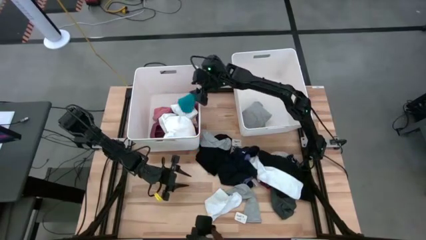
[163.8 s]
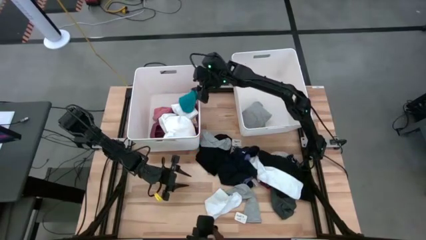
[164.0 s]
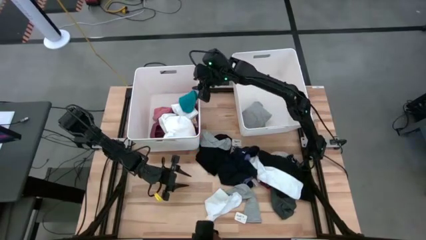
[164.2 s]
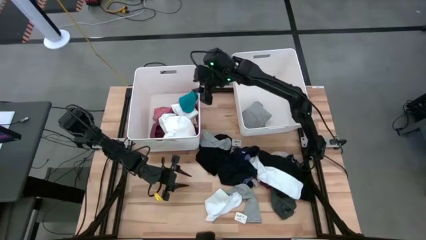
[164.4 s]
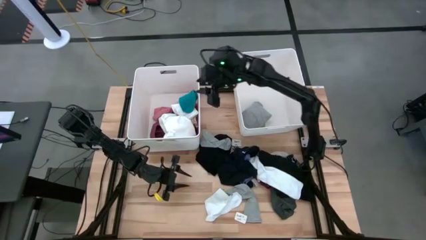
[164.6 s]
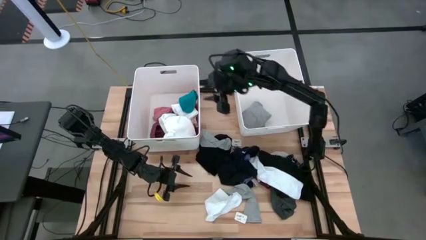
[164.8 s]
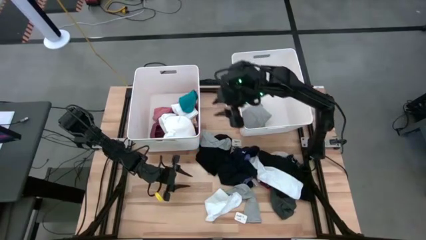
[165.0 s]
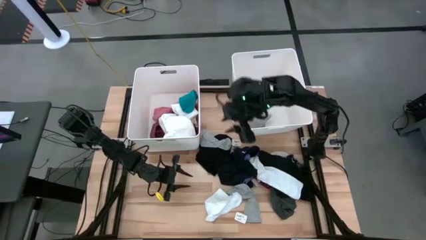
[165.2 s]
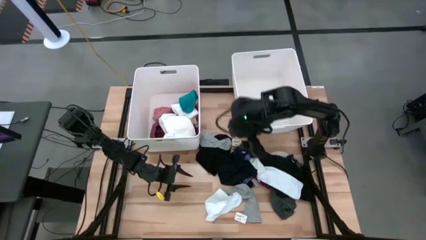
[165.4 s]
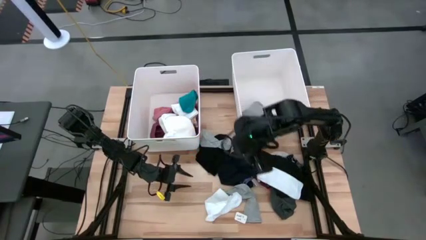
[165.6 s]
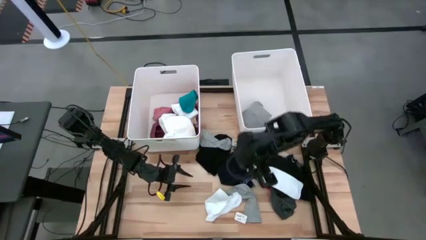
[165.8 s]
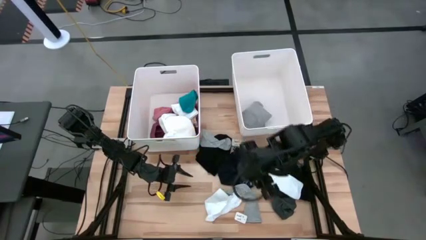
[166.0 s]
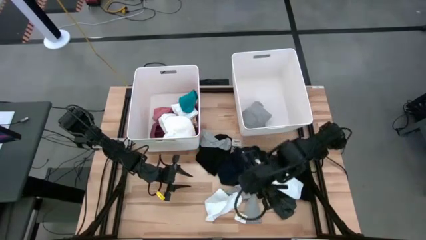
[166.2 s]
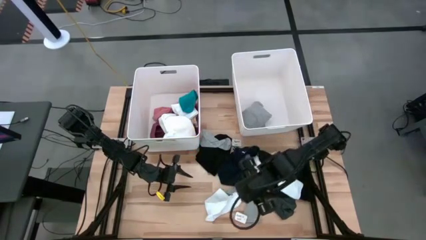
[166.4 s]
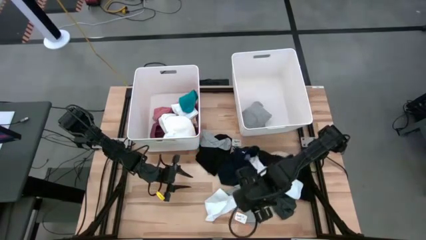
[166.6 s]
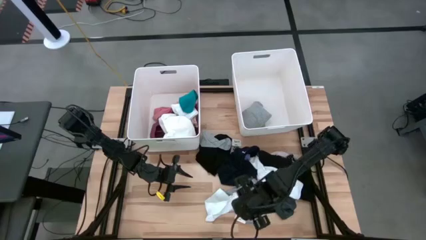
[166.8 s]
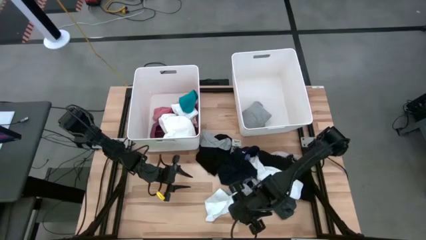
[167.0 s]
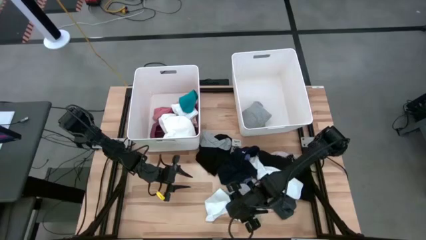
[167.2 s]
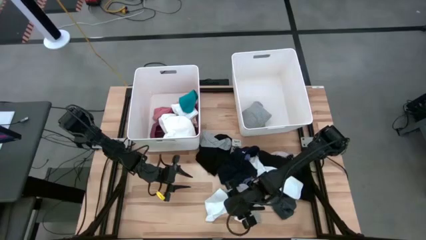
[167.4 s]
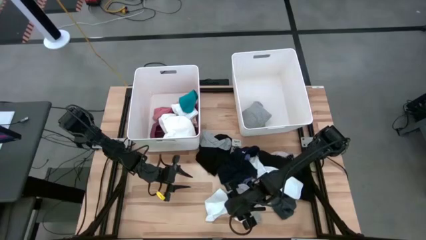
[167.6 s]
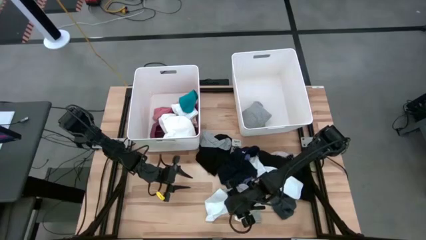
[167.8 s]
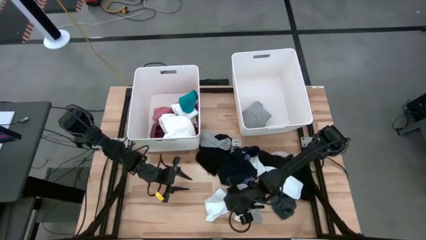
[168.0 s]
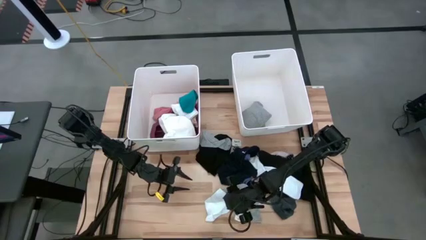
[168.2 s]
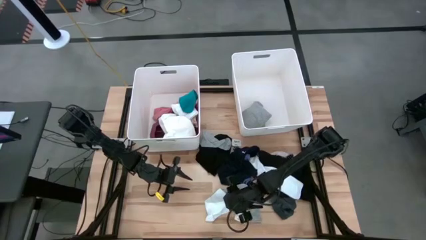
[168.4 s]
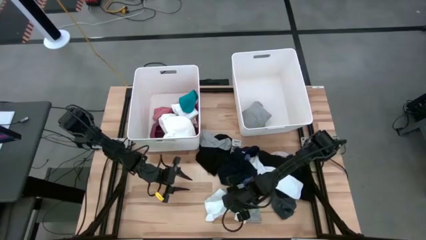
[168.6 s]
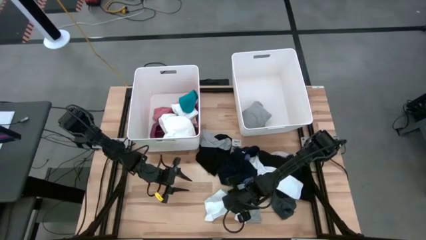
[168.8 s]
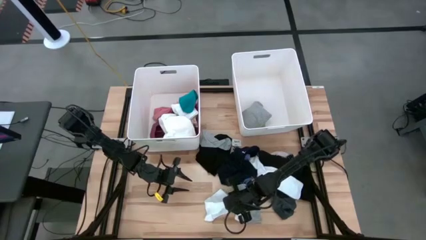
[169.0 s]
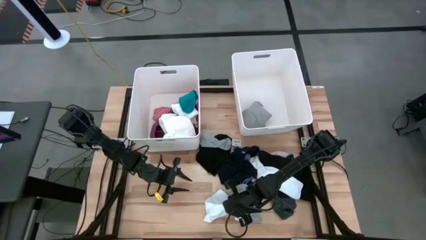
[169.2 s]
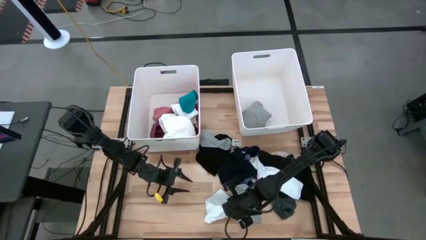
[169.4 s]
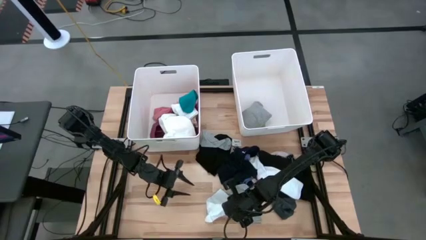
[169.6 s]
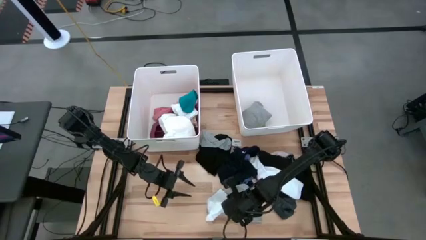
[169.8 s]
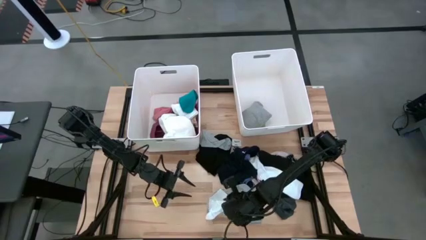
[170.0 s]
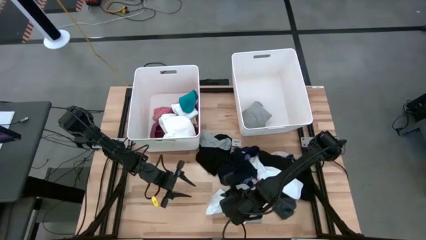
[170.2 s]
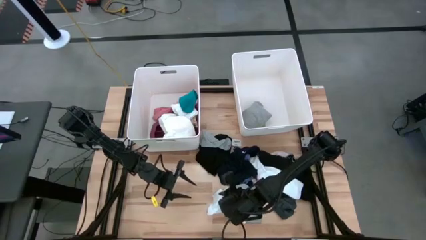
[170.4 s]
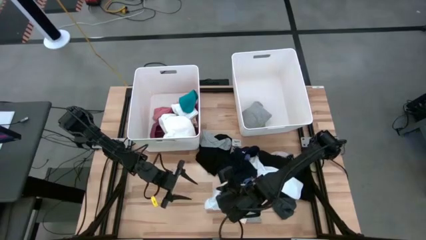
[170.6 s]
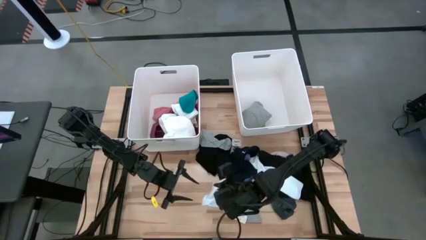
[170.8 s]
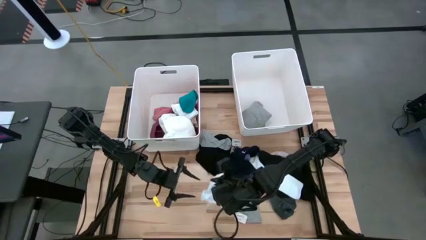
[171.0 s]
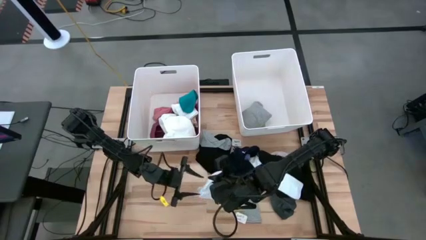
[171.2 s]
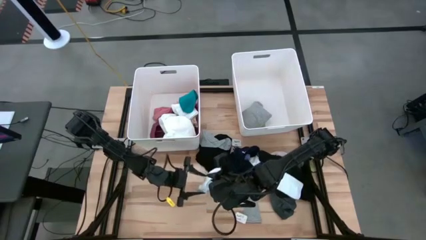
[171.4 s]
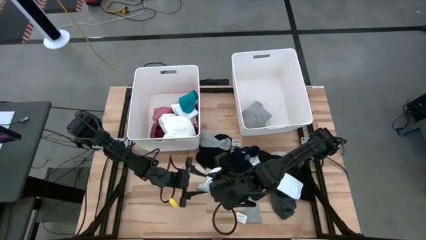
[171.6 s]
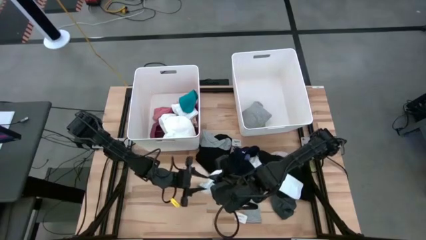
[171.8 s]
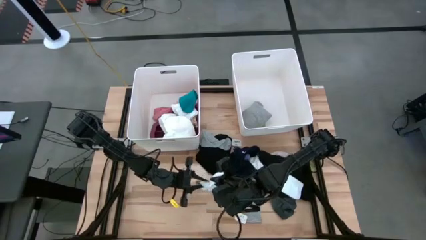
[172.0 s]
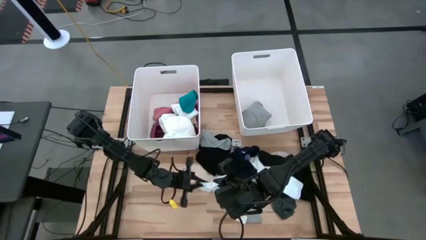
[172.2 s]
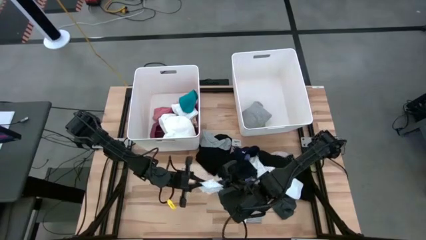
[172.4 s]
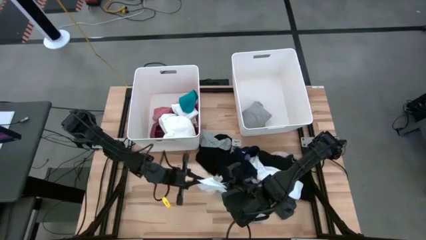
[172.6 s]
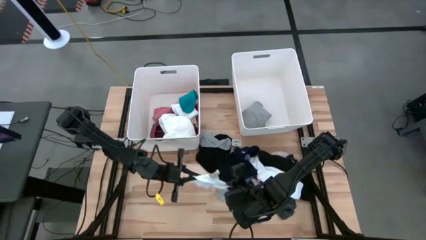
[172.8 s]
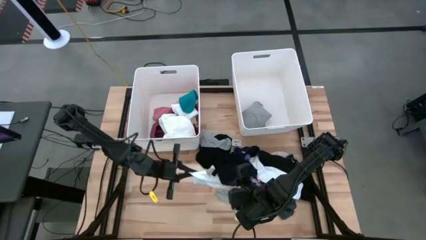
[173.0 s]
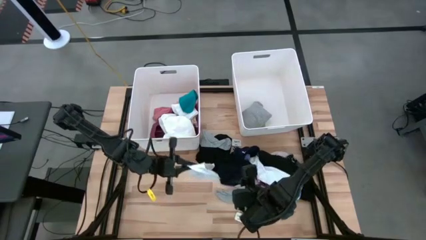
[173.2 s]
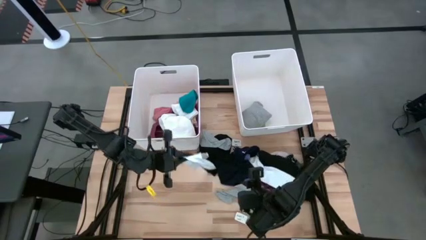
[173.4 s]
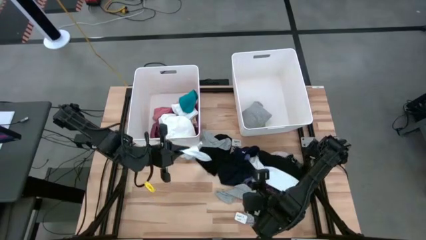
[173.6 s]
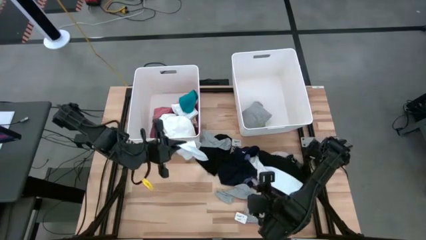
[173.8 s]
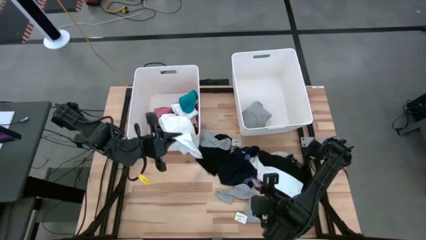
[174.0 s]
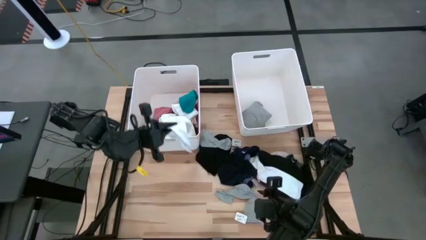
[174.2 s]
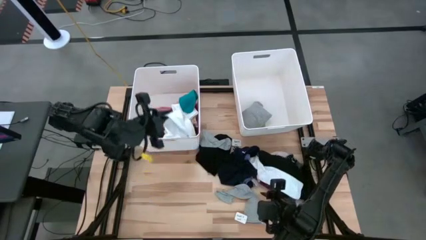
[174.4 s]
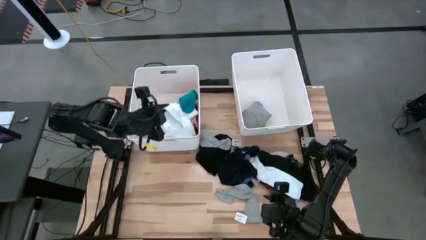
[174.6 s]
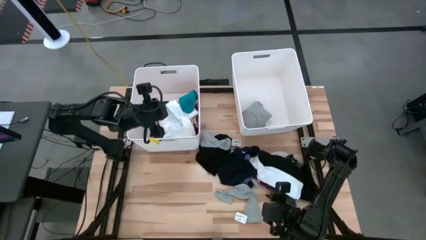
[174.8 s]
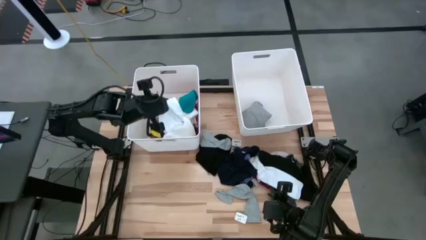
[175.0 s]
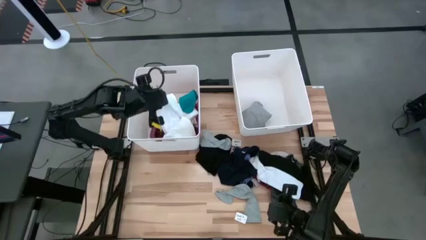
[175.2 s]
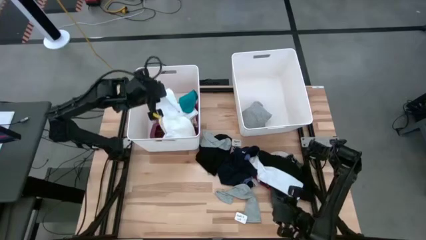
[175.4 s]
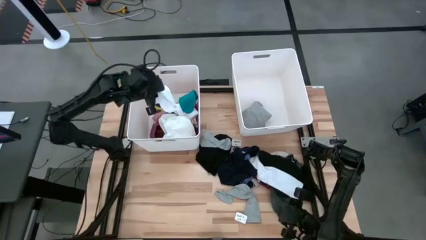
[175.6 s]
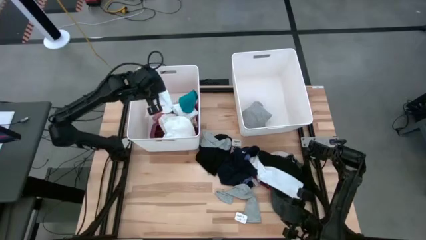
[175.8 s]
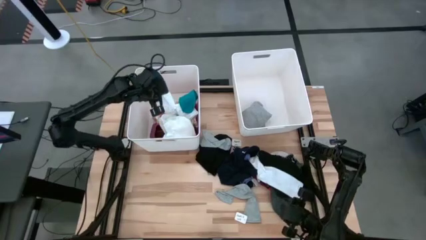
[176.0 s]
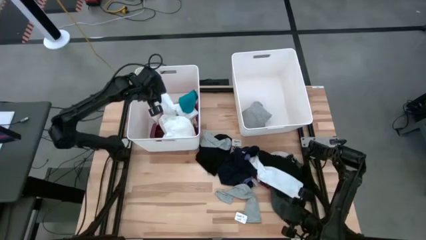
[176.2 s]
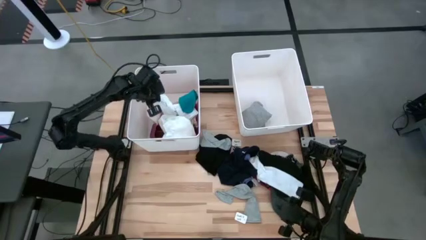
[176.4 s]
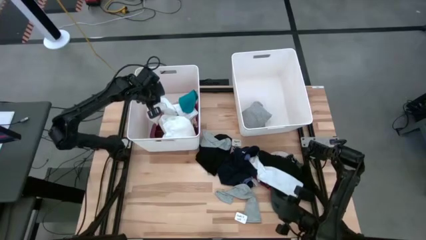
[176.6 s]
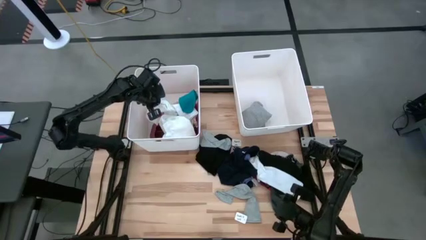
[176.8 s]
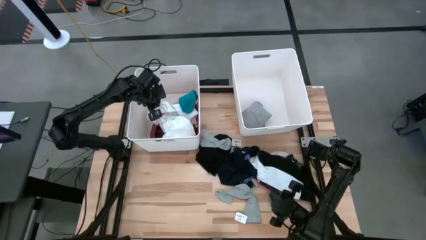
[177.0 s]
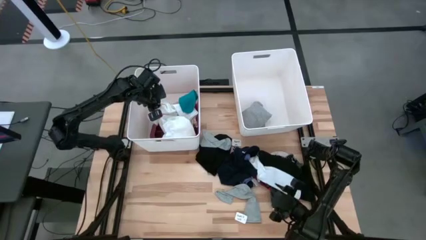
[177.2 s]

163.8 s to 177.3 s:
Task: Sort clothes
Put the white sock into the left white bin

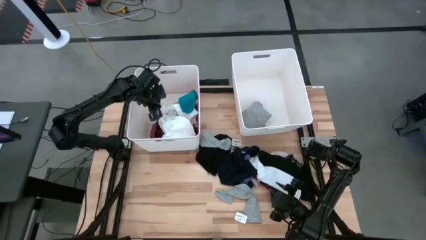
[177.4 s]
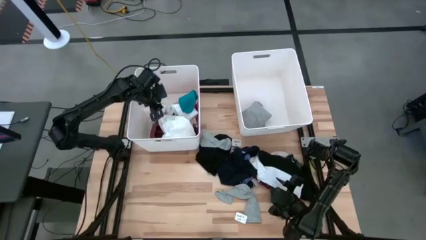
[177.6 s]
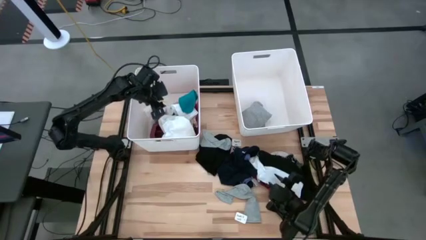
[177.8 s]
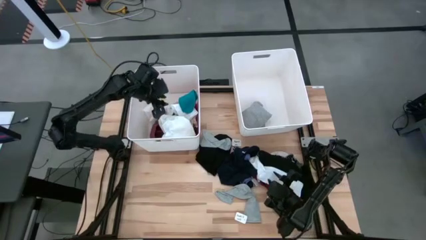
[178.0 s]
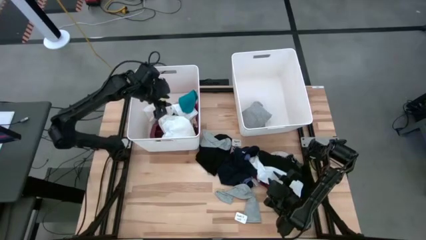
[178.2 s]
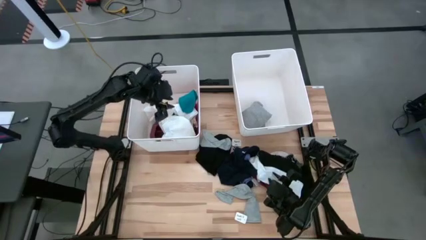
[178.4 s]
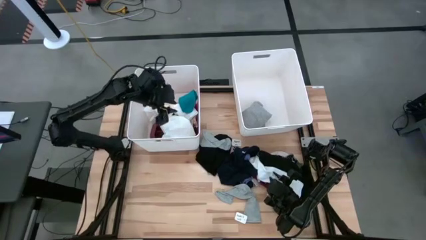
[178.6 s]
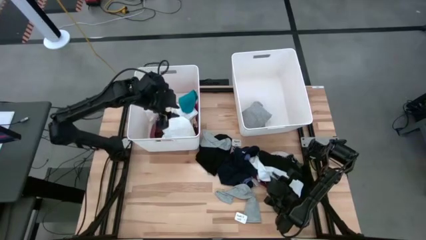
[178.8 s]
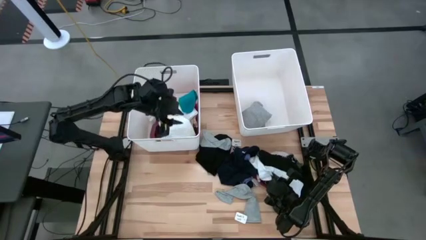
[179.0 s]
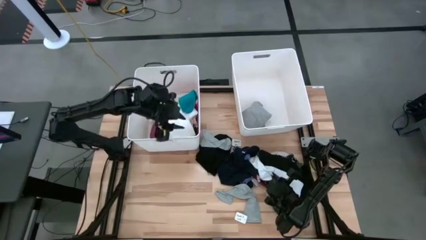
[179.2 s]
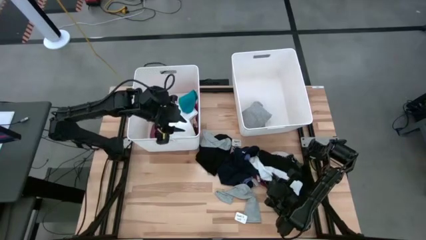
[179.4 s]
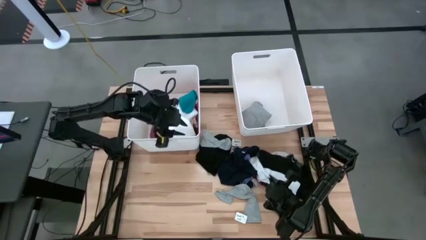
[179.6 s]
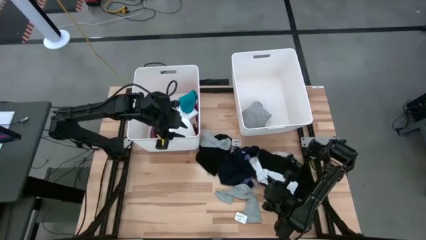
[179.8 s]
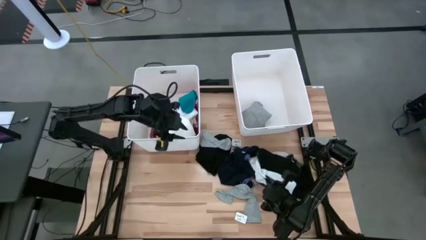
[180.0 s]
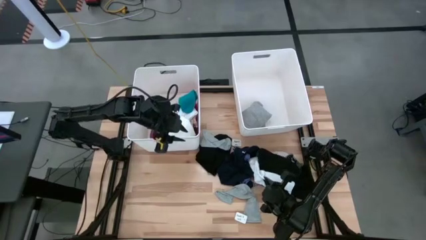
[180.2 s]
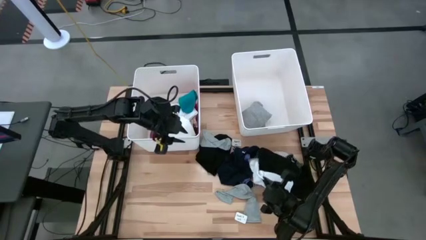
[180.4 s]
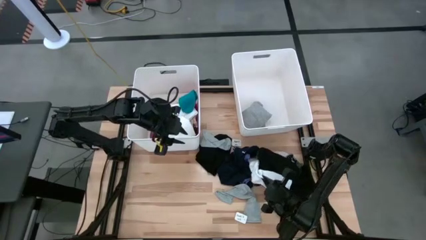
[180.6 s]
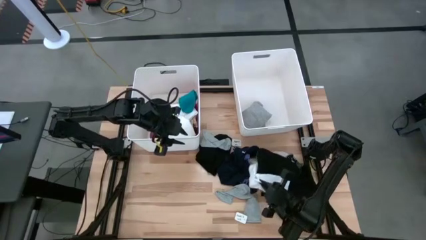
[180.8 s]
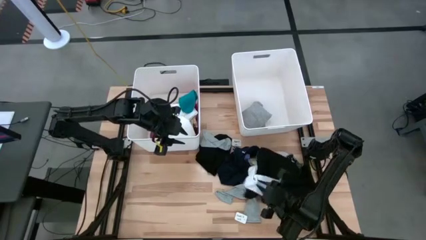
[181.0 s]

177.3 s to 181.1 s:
Put the white sock into the left white bin
